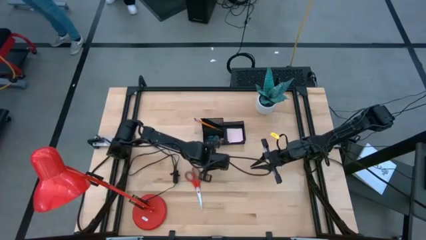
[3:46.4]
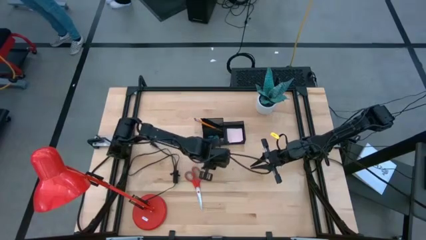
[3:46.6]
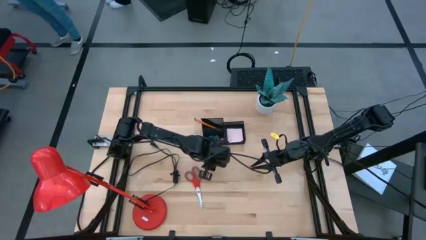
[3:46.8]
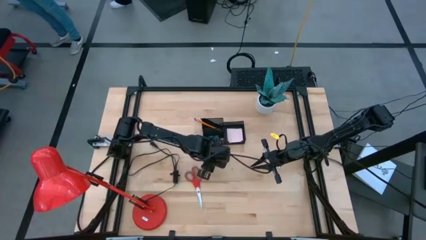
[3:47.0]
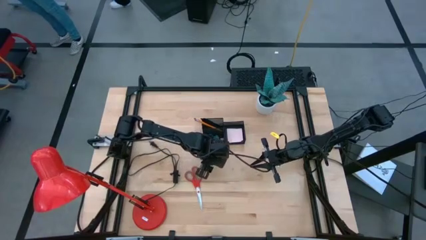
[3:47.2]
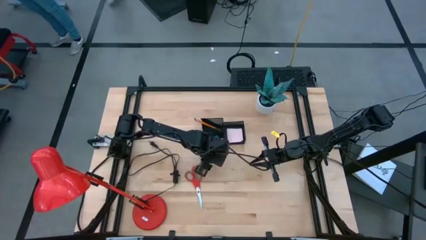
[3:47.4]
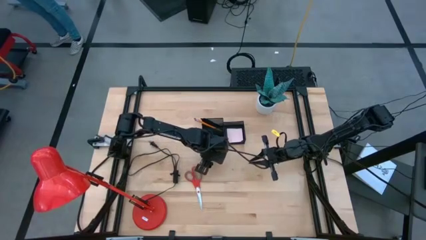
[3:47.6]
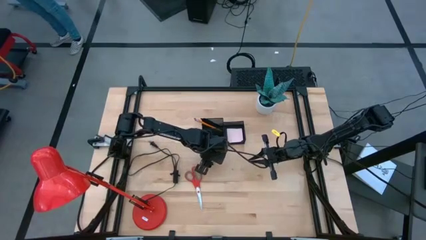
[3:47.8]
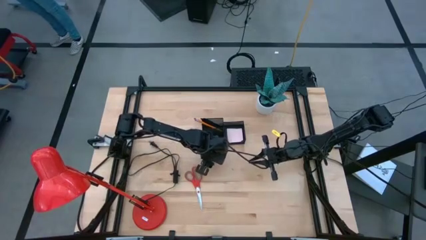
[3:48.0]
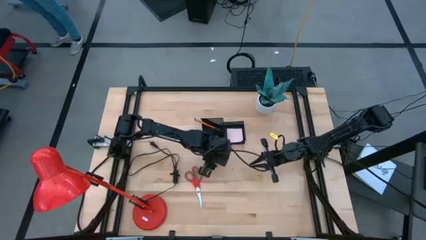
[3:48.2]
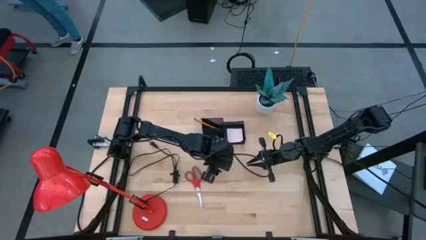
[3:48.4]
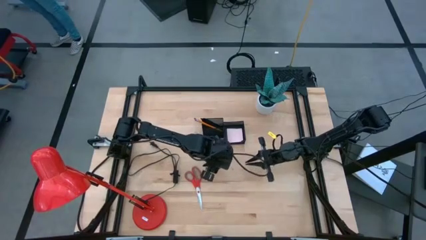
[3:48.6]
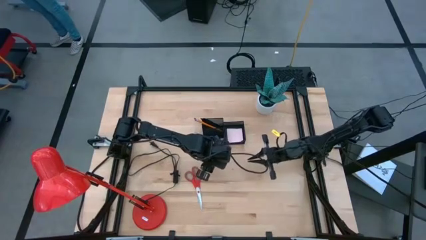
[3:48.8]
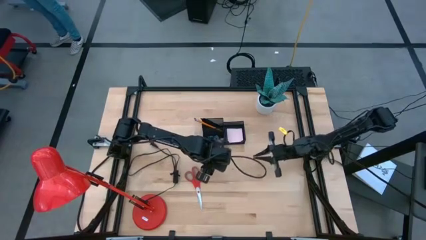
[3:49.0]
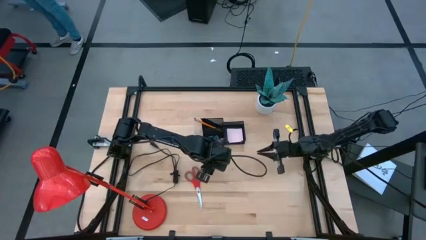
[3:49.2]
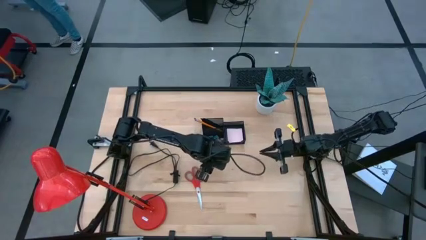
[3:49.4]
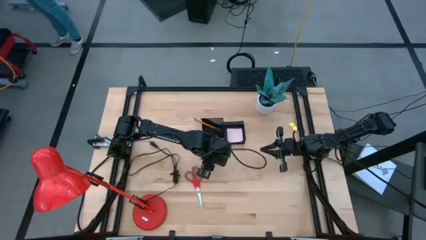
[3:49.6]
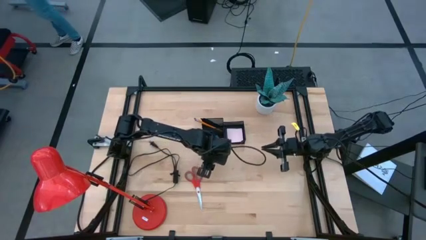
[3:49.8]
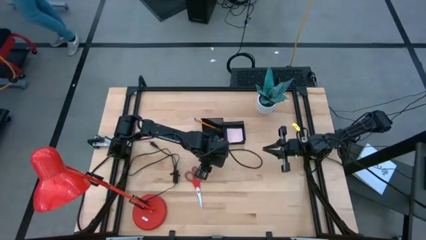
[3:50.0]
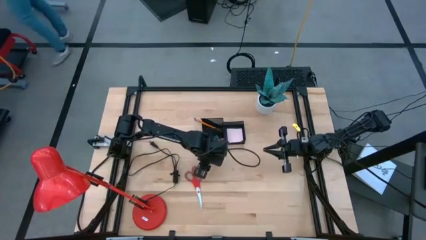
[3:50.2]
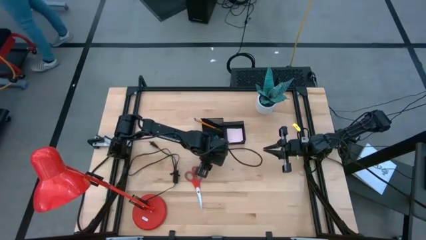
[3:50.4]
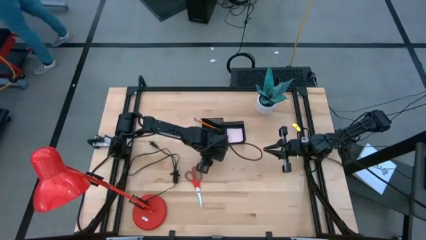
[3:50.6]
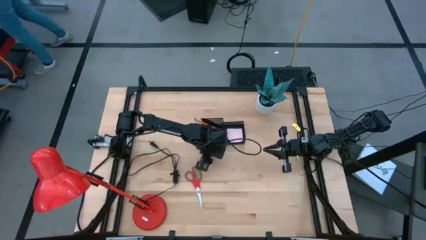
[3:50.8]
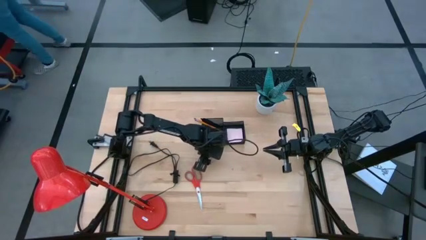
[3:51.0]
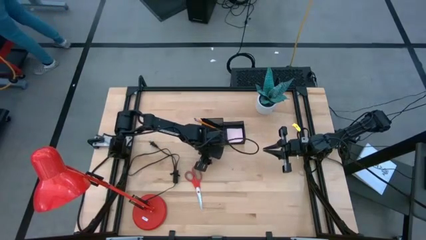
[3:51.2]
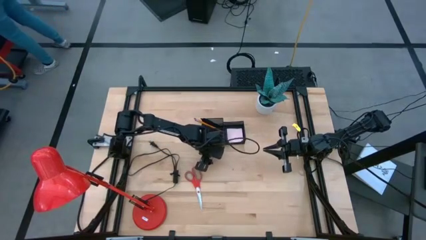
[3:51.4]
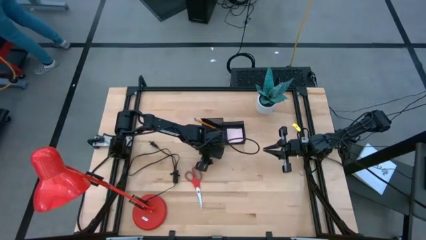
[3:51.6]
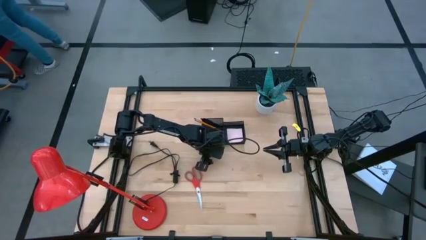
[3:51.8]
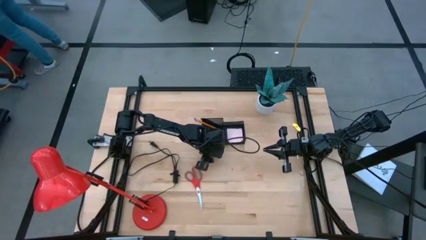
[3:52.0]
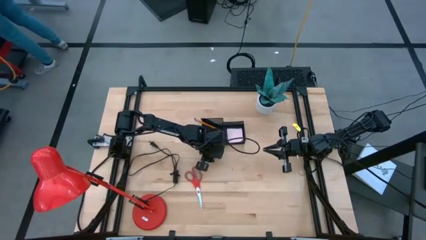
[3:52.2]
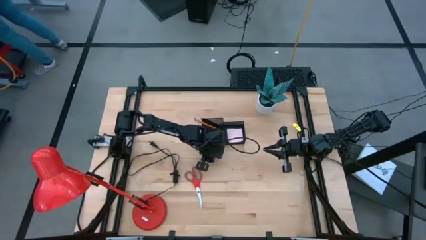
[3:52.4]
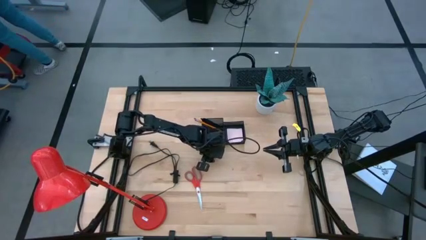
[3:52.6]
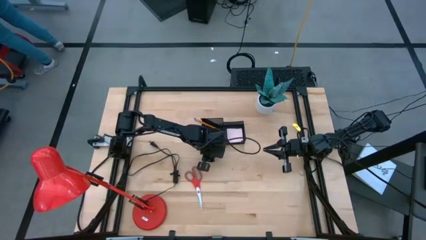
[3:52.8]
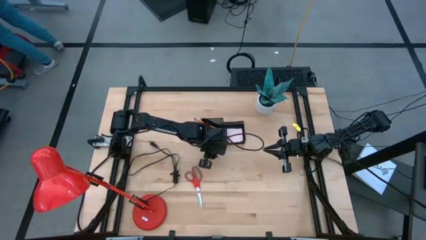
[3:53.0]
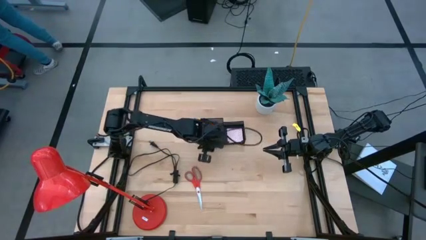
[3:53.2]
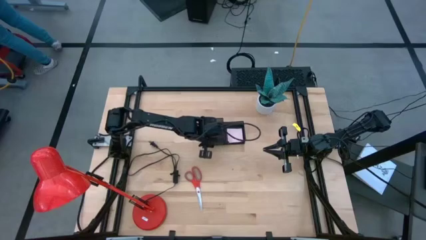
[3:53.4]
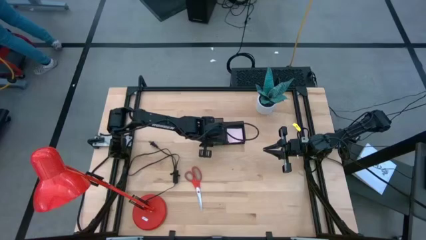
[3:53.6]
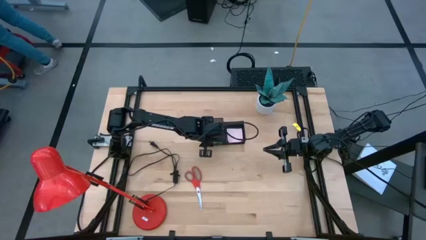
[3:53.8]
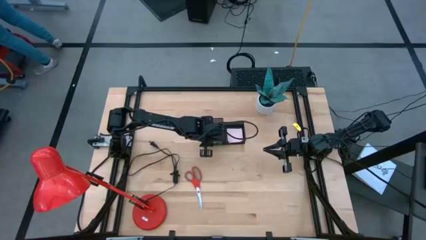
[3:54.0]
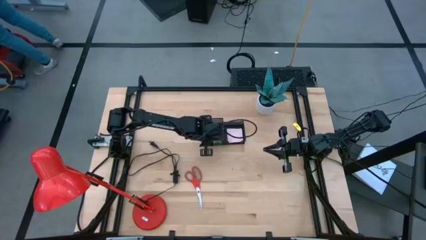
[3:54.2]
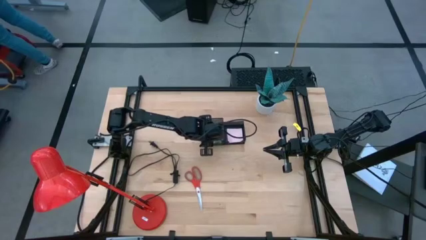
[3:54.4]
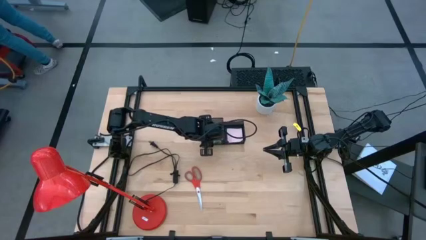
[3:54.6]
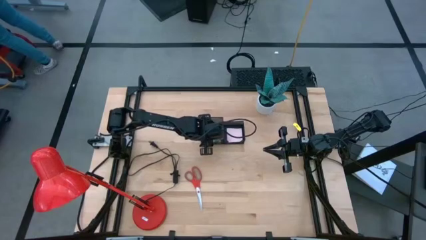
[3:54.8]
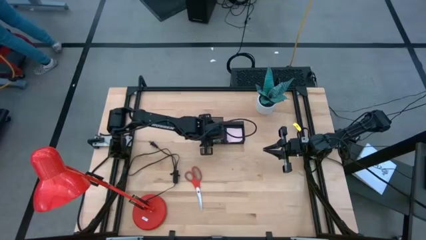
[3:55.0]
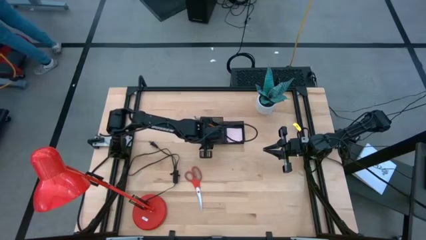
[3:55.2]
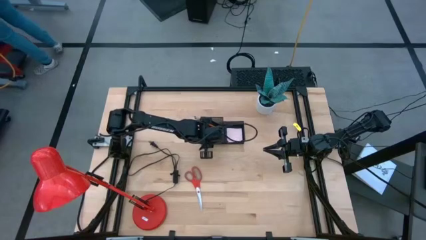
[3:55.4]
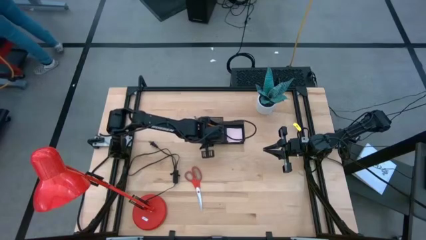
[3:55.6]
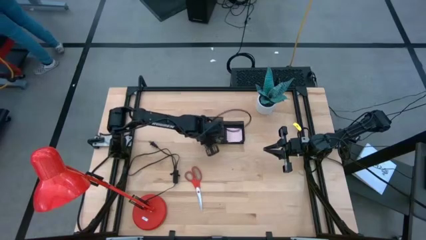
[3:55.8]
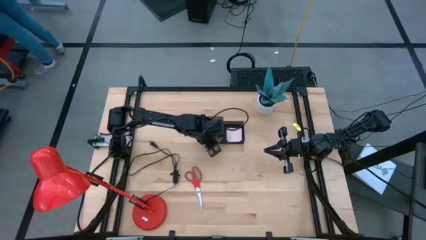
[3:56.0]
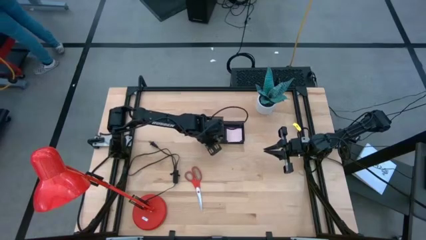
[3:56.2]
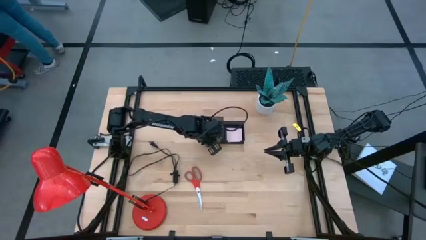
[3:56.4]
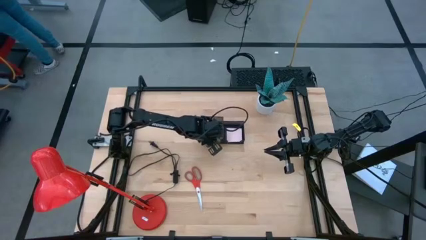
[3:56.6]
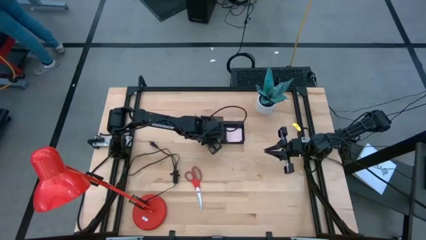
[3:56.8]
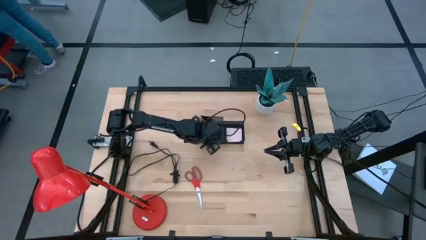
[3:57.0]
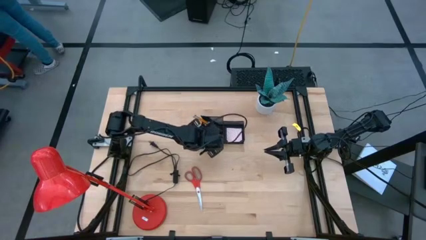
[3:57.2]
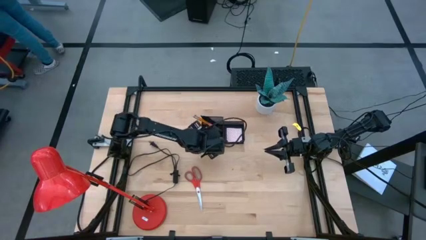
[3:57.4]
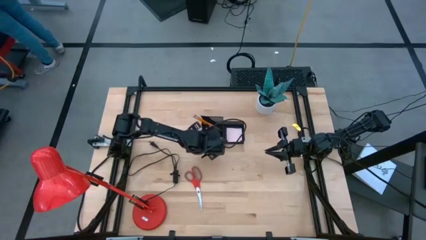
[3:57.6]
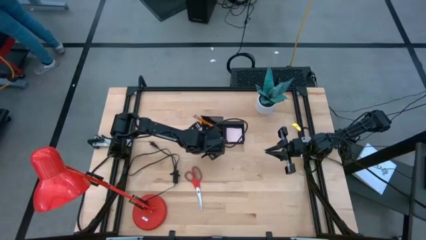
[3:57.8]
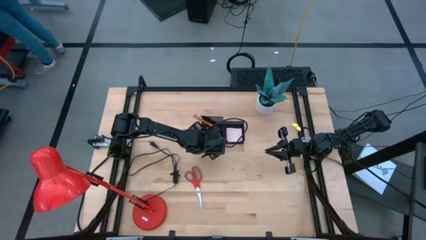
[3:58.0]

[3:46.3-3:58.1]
Task: Pick and place office supplies into organizer
Put the pink binder clip into the black desk organizer

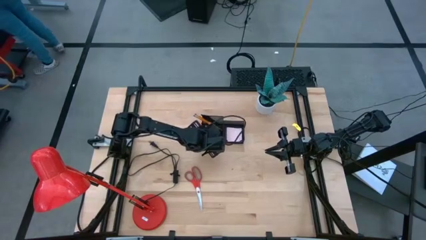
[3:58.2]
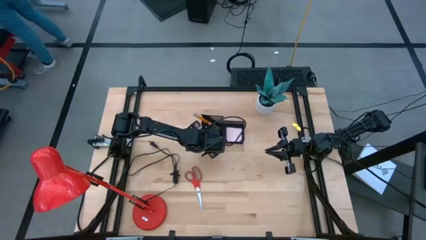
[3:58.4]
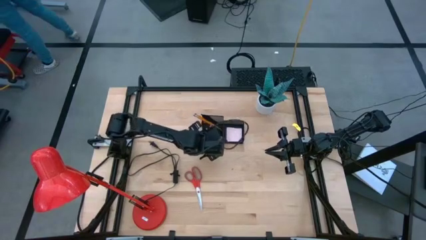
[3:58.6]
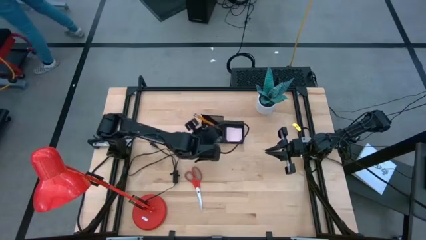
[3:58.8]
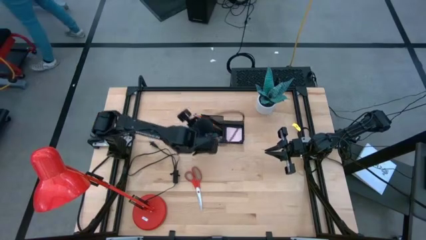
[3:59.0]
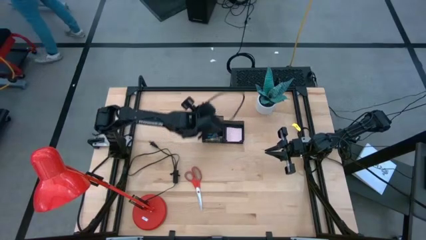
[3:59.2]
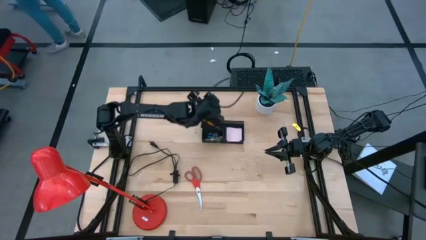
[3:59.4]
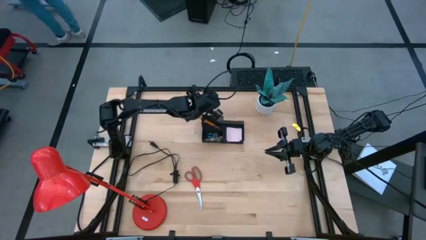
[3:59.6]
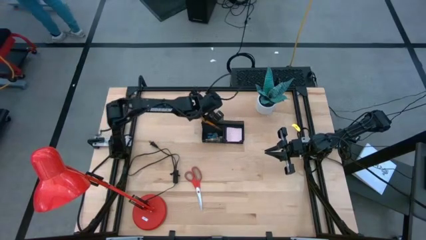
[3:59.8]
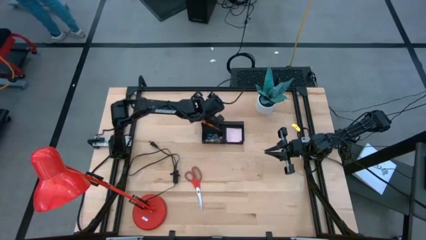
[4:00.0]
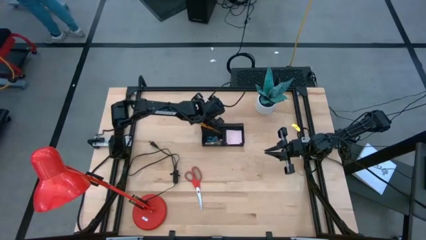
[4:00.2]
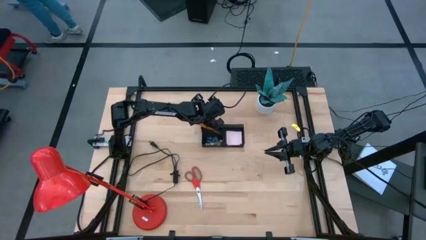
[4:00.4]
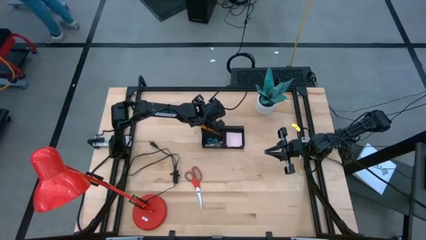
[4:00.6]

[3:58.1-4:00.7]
Adjust the black desk organizer
